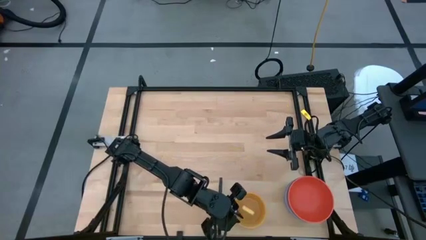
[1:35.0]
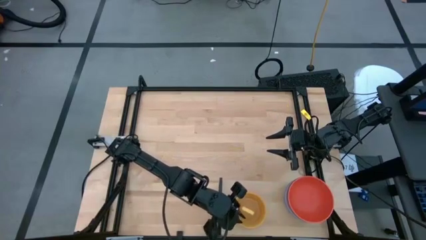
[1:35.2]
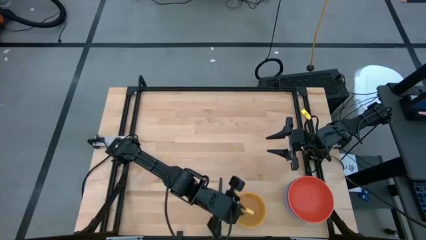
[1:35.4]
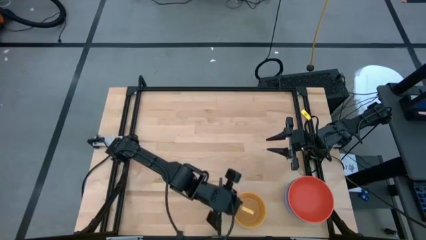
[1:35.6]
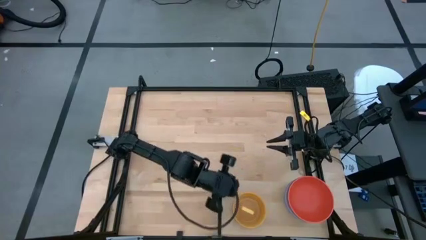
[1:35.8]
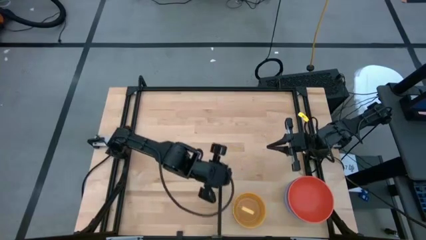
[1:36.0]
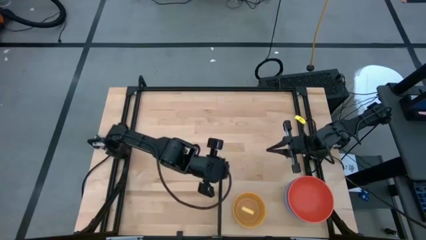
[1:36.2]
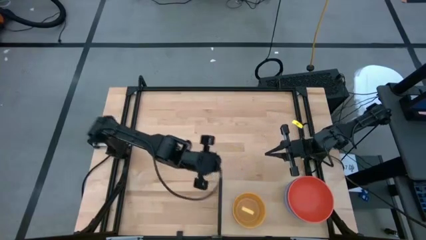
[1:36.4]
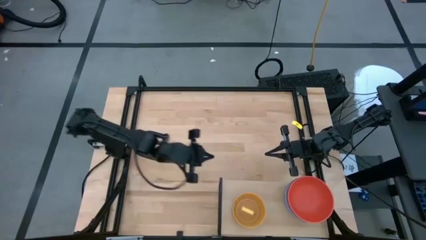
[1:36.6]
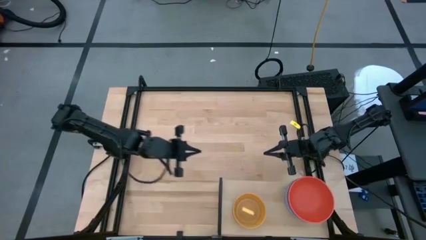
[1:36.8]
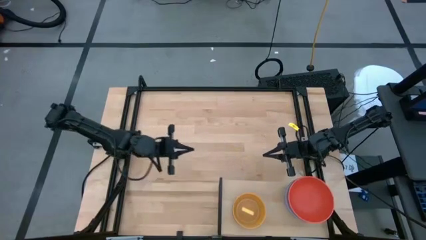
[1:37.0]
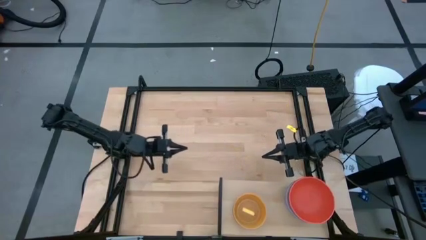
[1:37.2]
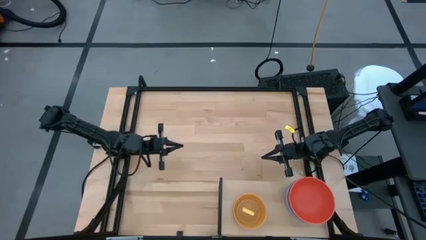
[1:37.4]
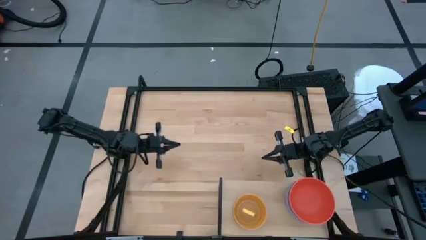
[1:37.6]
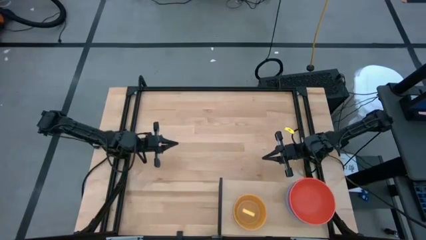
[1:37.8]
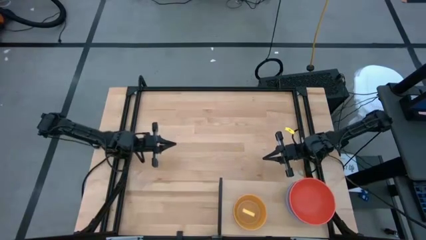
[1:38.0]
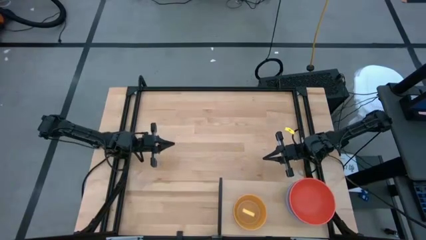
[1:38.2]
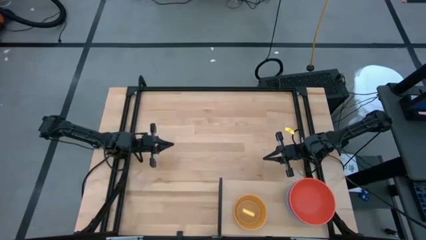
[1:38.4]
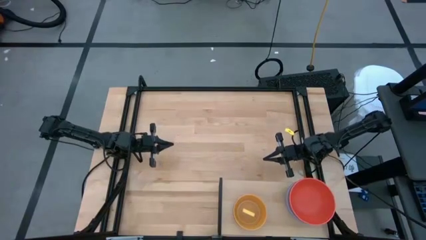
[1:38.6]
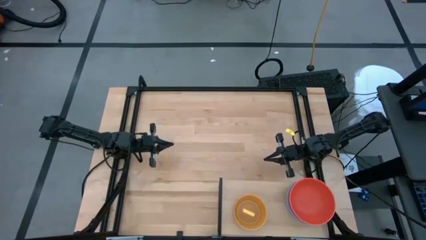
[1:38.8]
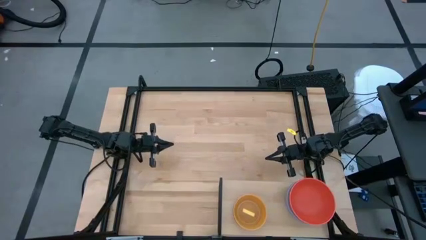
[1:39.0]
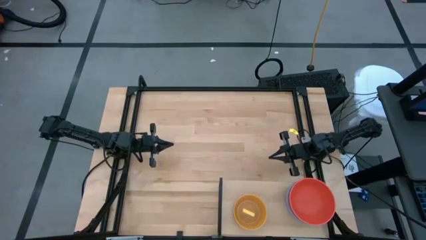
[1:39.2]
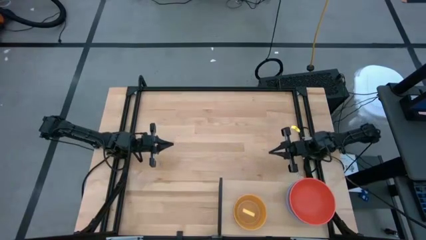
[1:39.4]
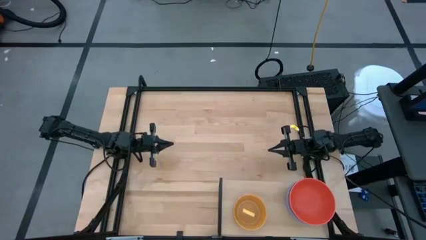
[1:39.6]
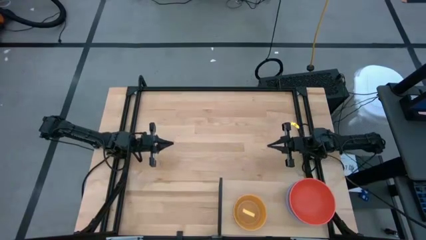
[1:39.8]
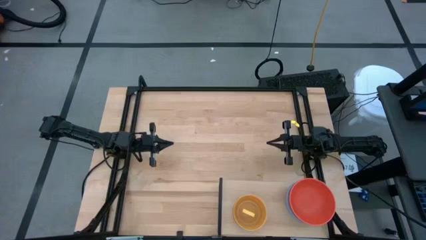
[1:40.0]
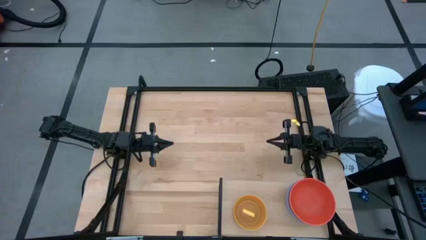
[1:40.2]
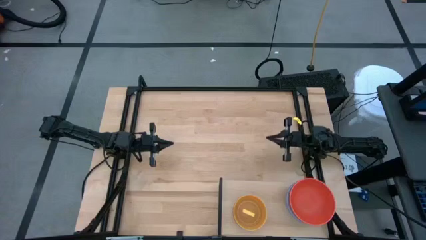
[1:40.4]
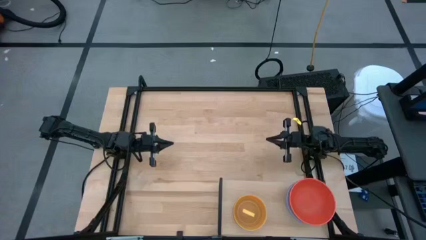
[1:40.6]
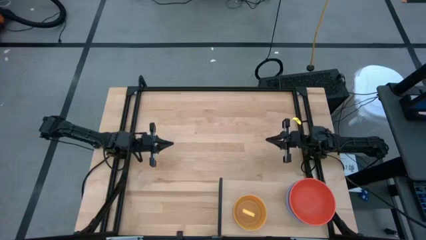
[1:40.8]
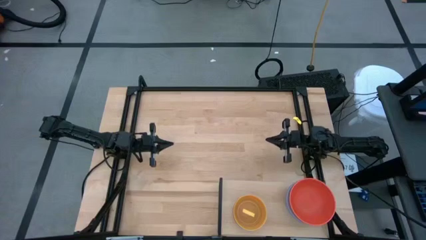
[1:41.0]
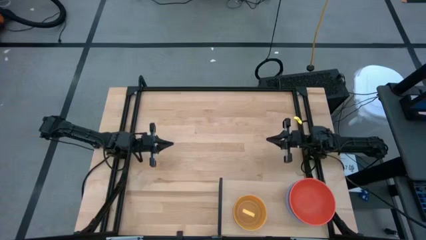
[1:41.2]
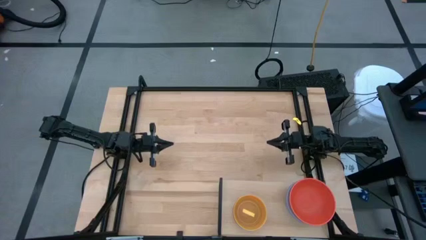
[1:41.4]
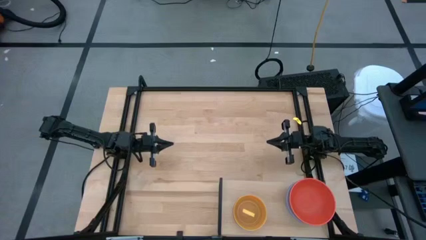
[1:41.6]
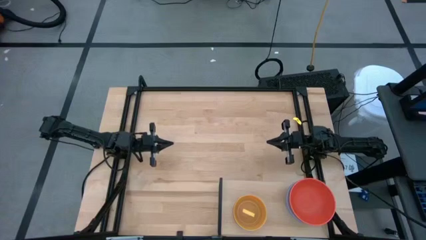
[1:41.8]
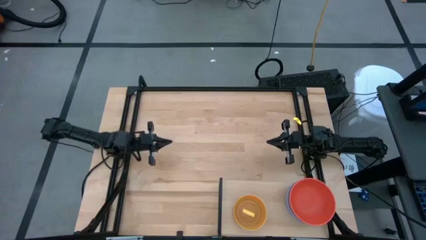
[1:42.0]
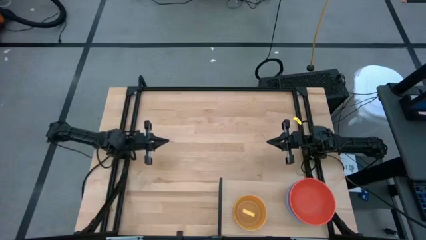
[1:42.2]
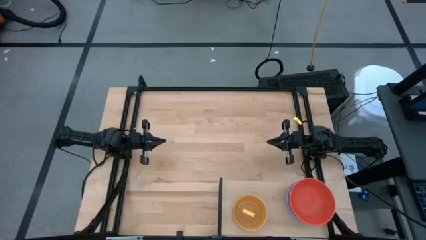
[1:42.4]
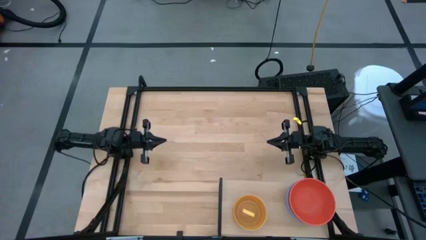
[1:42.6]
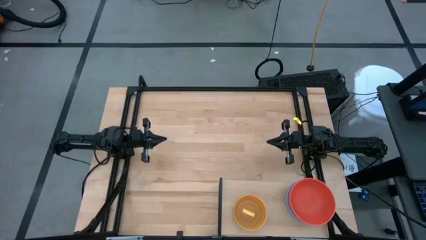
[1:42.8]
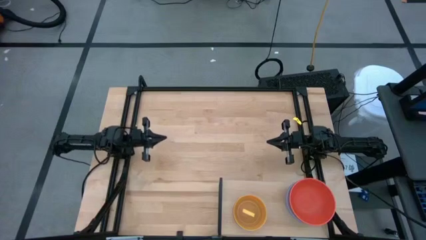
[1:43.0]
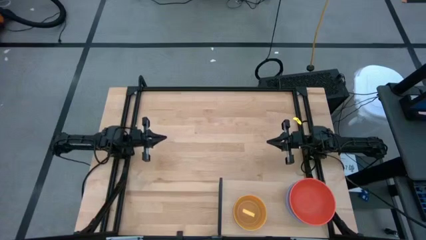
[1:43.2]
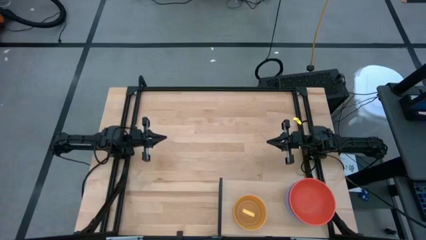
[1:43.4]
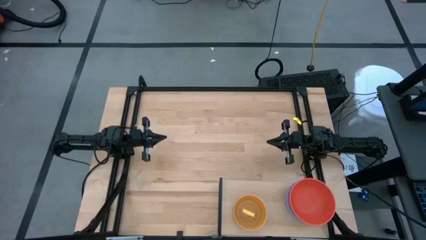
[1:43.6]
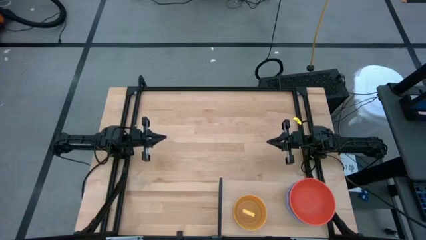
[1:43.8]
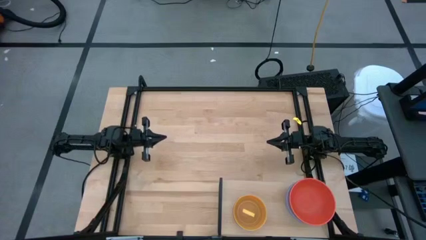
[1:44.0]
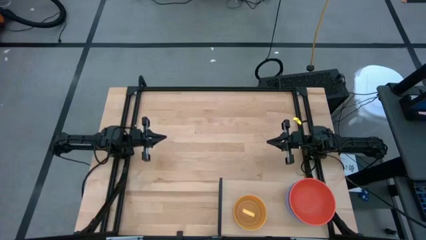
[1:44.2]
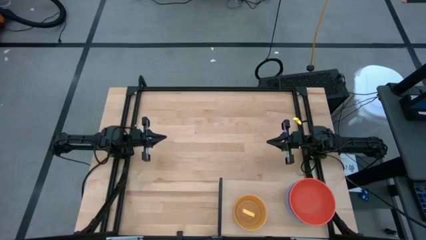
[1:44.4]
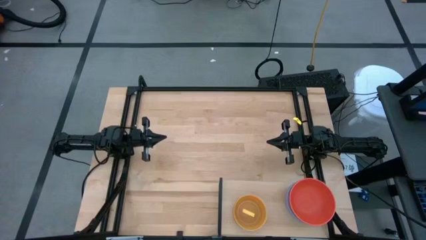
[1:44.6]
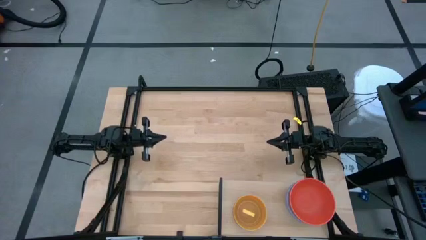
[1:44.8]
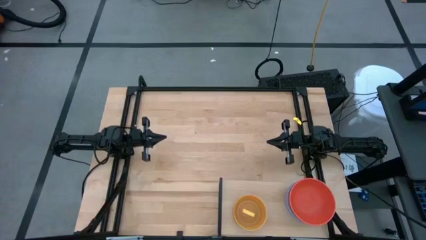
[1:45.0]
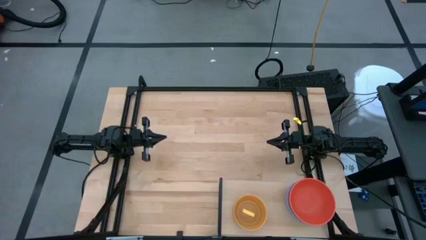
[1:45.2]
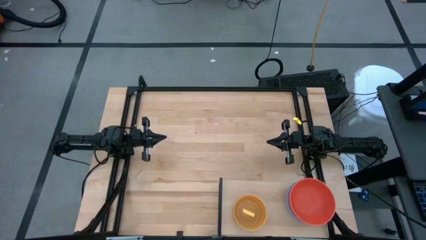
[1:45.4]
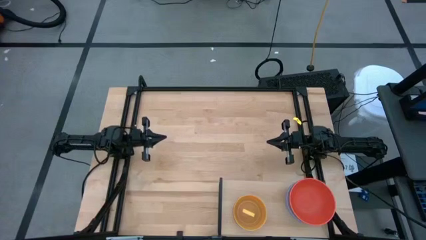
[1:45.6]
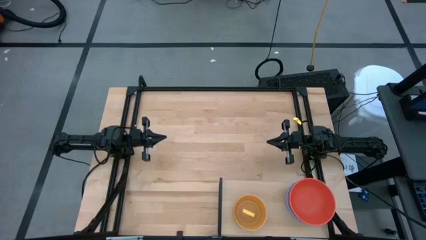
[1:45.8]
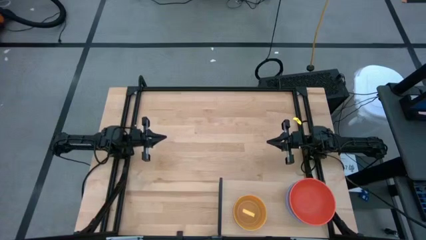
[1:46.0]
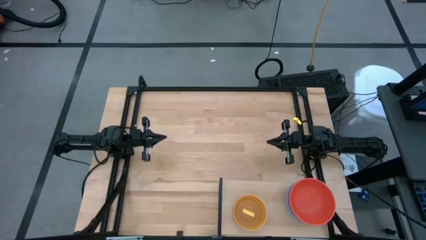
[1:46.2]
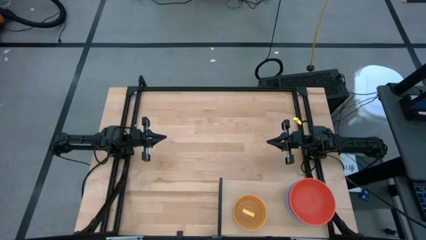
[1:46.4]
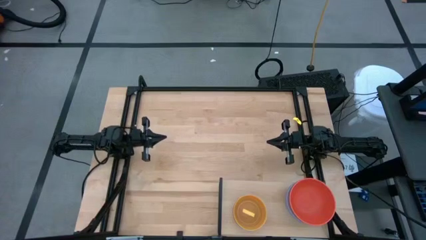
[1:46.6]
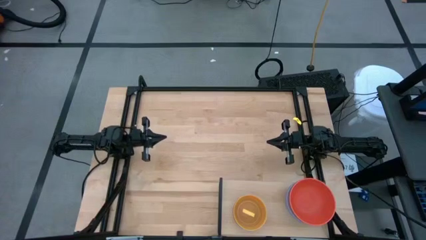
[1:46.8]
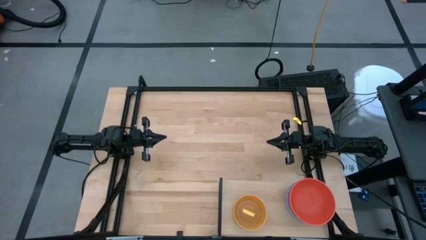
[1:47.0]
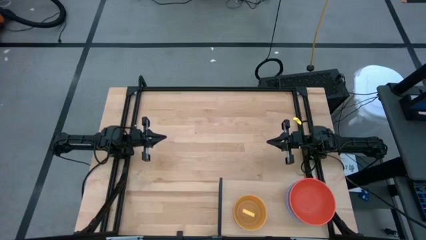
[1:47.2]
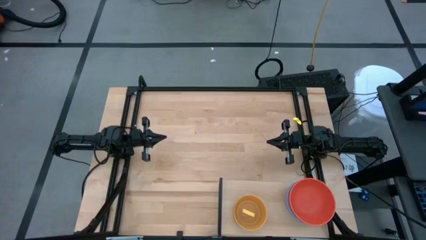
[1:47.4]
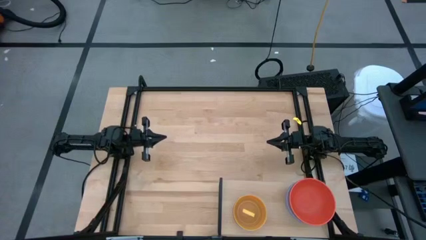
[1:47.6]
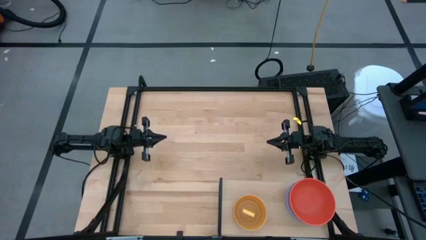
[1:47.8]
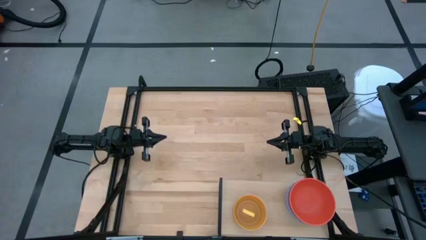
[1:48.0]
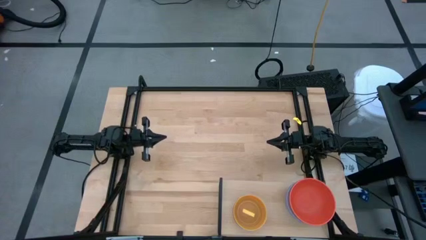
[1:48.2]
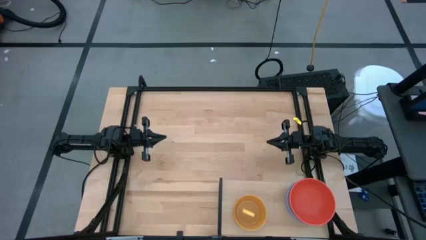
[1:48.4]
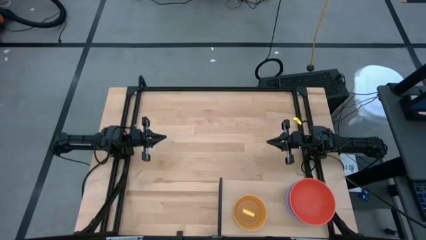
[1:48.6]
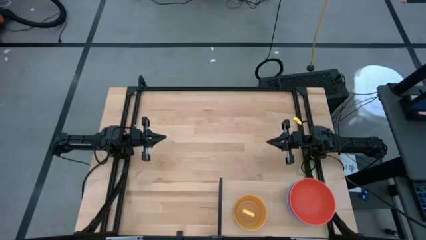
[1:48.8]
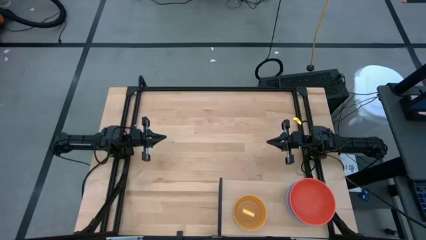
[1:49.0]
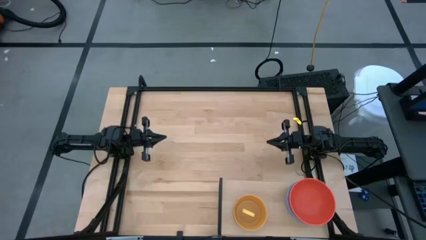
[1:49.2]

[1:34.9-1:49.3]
Task: Place and stack bowls onto a shelf
Return to Home Position

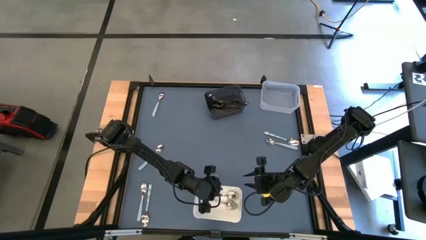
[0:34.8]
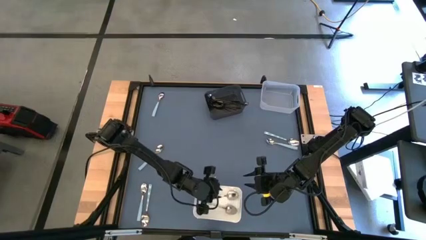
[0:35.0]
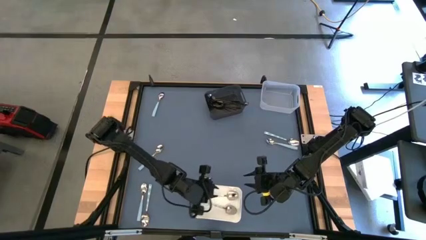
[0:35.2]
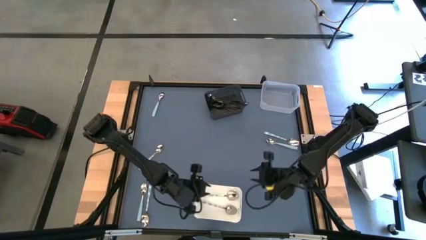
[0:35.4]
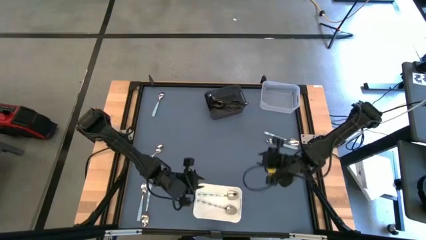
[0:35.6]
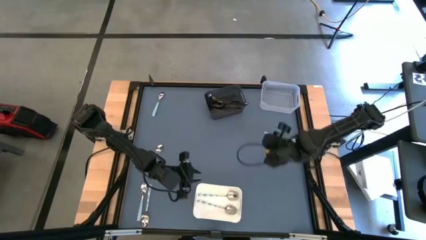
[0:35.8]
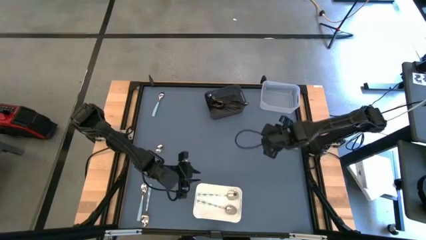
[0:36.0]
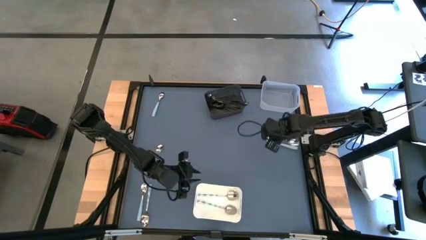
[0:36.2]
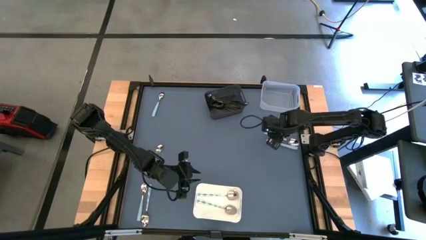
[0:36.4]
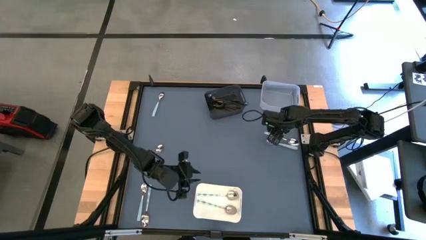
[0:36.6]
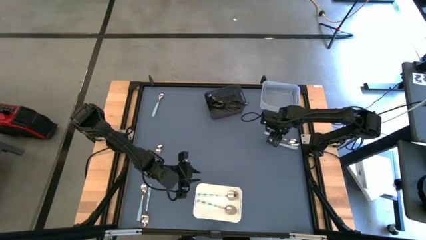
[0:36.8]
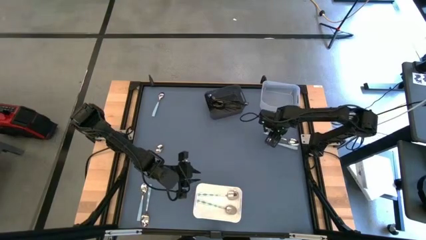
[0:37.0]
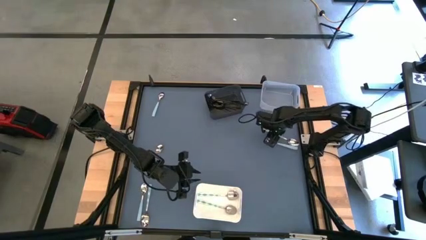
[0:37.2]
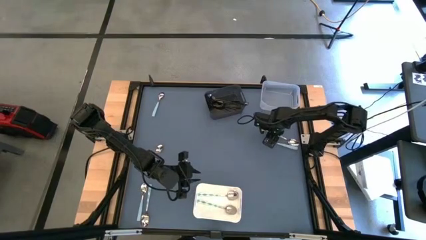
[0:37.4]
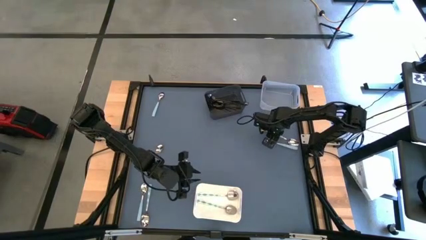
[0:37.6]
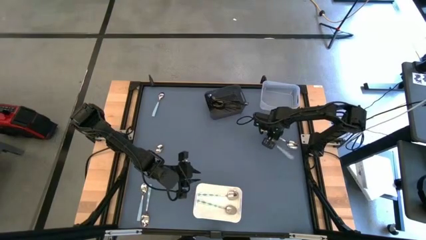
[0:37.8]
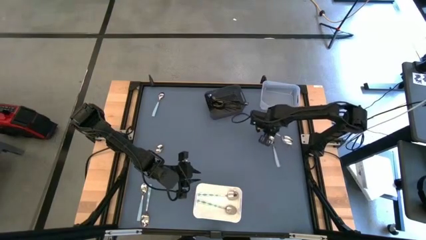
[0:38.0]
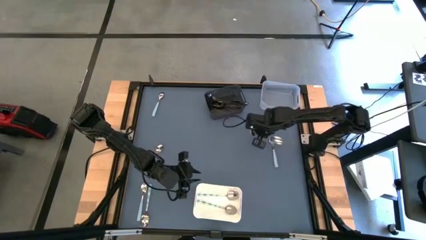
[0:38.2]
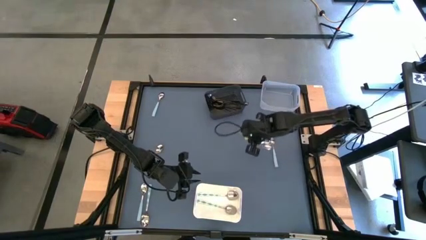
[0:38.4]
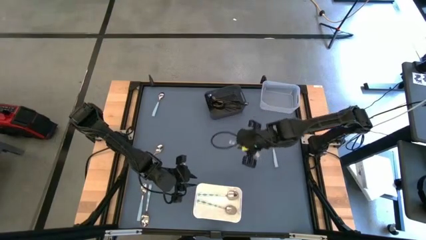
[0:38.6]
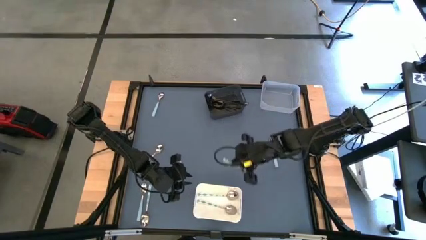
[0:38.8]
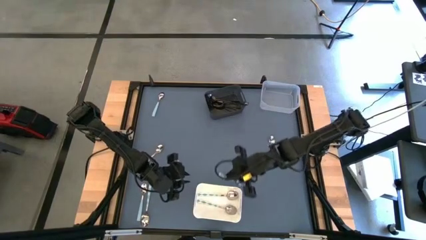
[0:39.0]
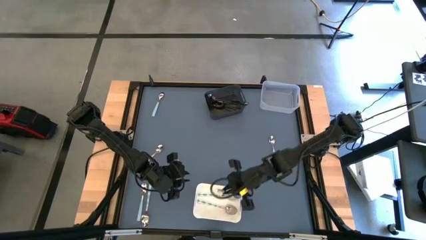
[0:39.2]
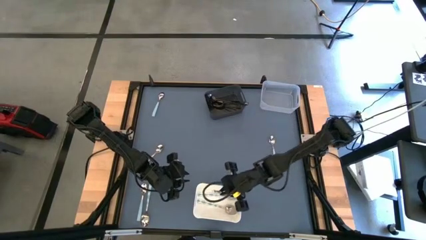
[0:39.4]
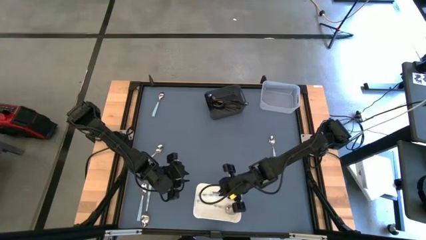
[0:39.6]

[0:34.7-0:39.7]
Task: Sort silverware by color (type)
Put the white patterned spoon into the white bin
